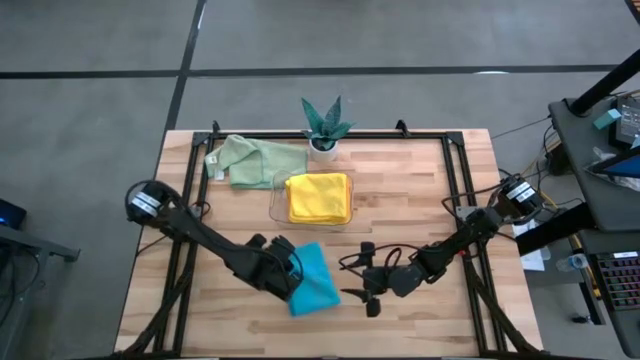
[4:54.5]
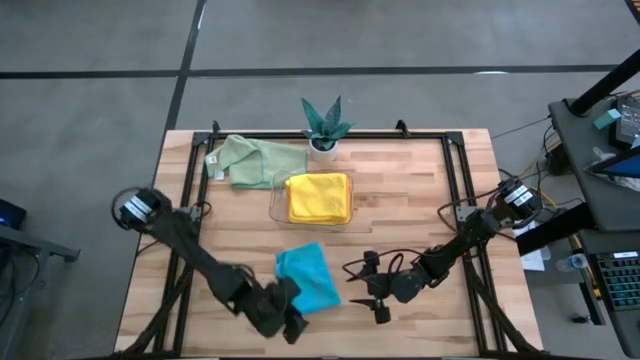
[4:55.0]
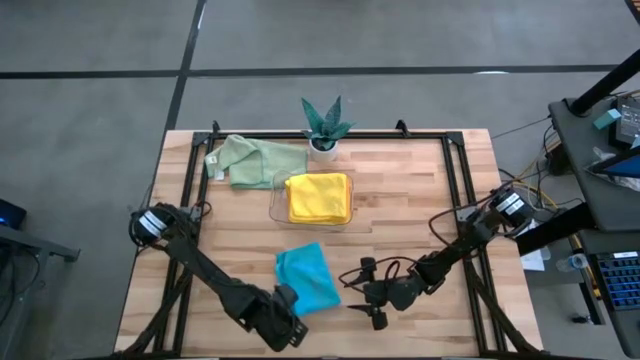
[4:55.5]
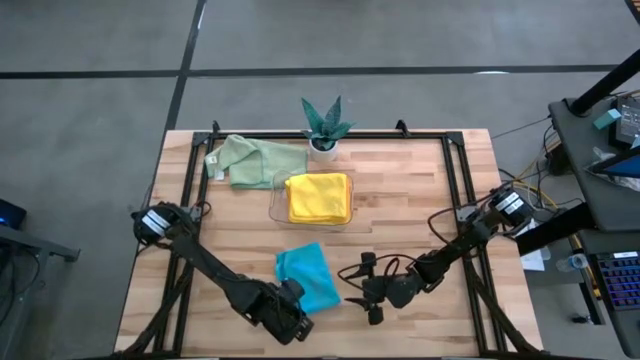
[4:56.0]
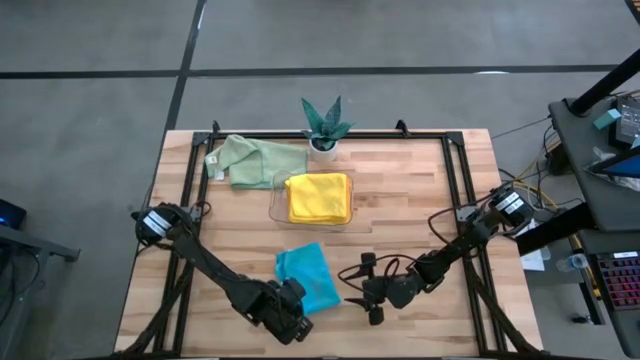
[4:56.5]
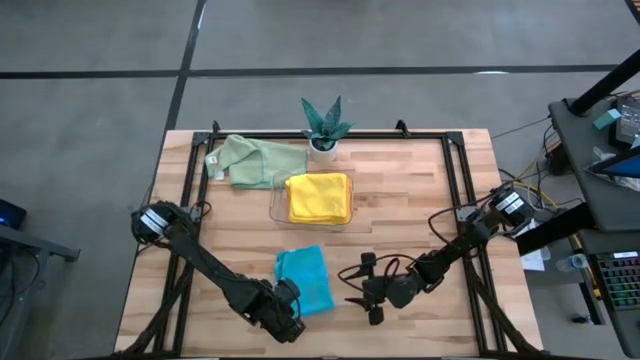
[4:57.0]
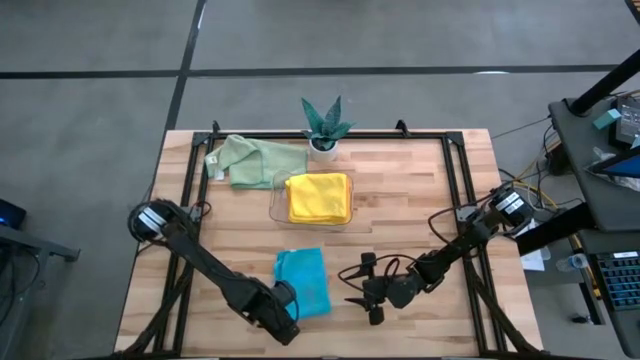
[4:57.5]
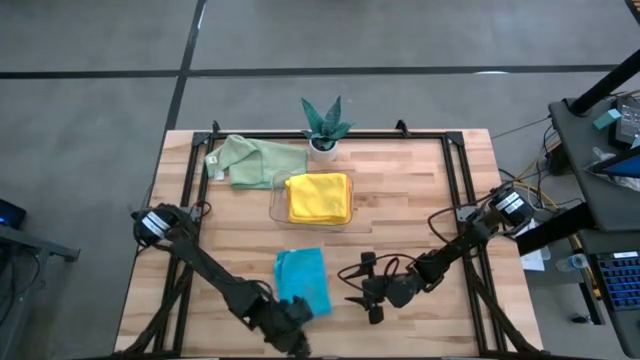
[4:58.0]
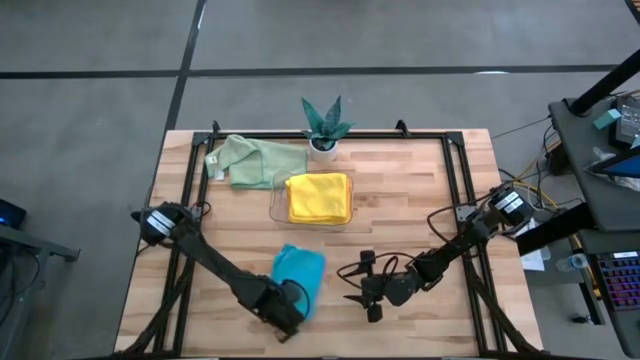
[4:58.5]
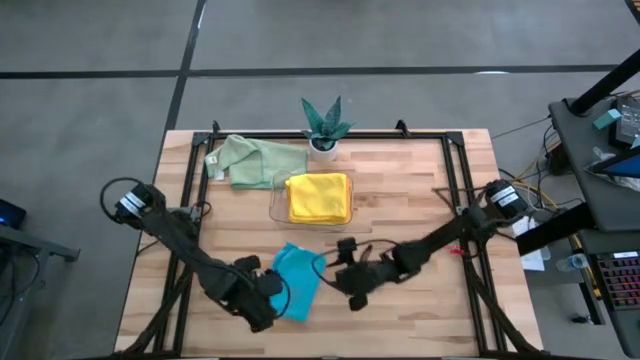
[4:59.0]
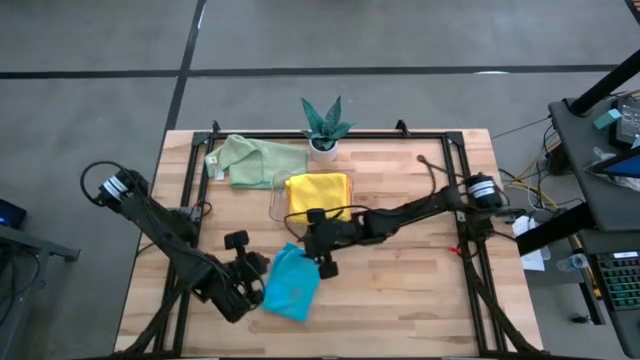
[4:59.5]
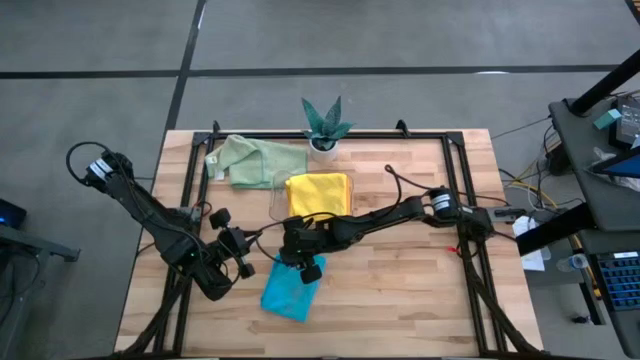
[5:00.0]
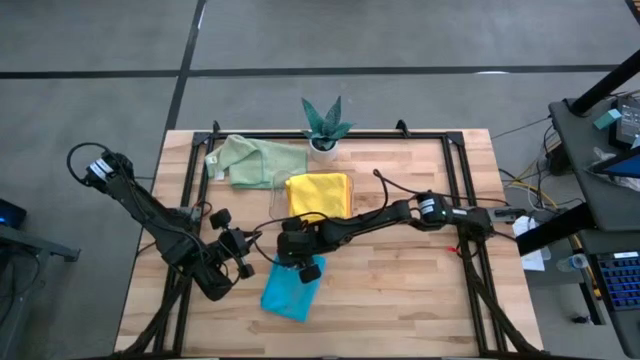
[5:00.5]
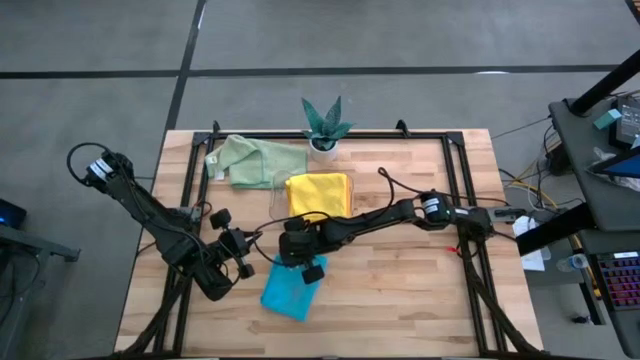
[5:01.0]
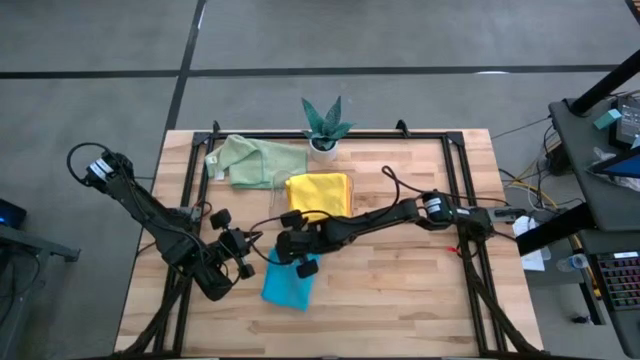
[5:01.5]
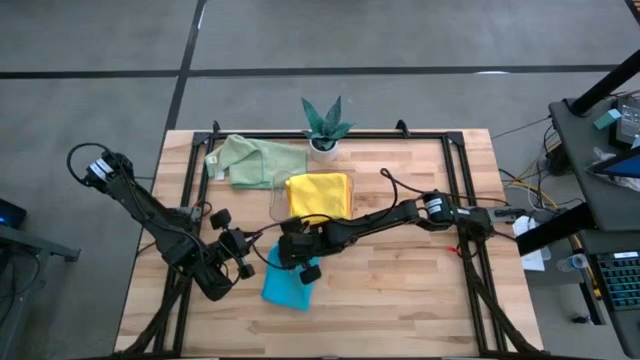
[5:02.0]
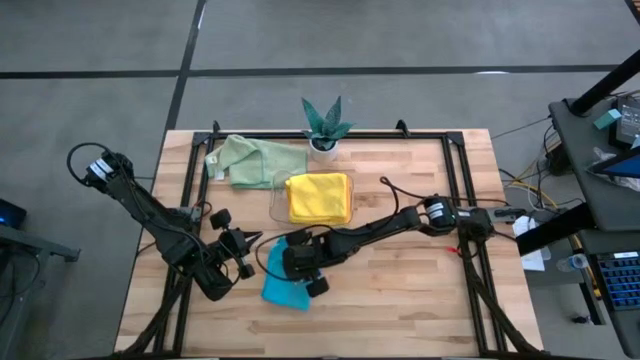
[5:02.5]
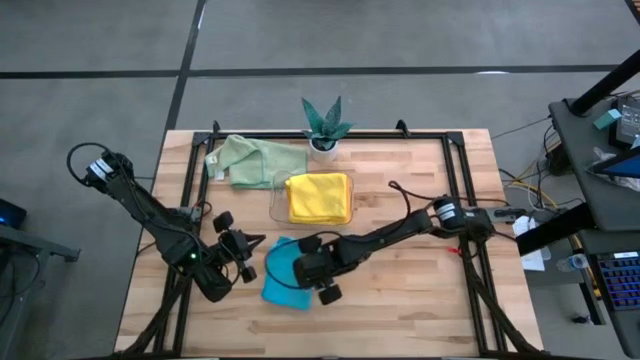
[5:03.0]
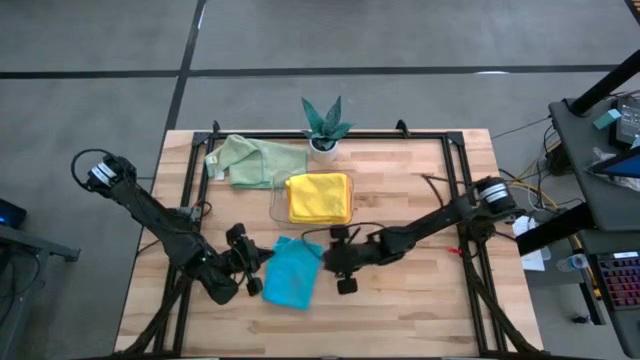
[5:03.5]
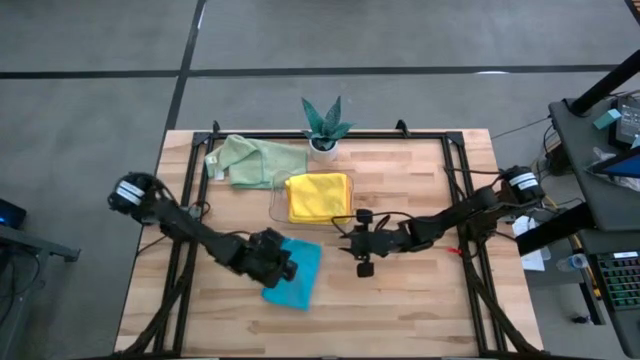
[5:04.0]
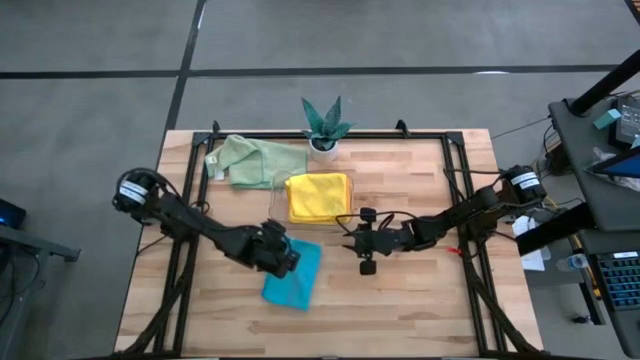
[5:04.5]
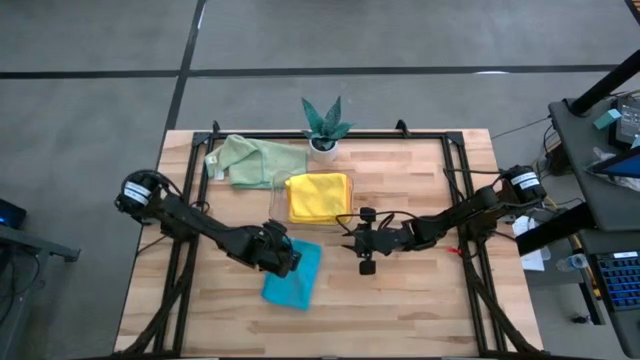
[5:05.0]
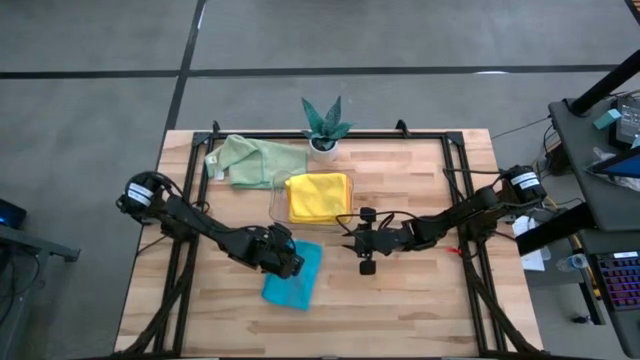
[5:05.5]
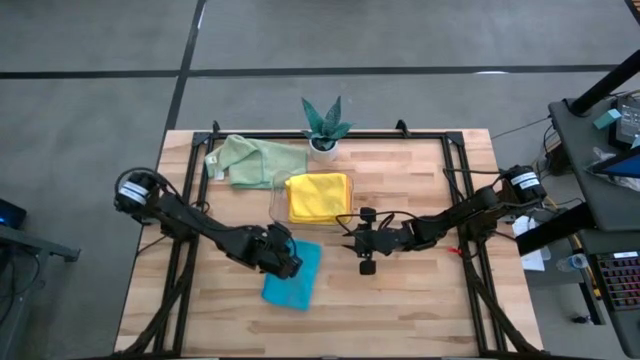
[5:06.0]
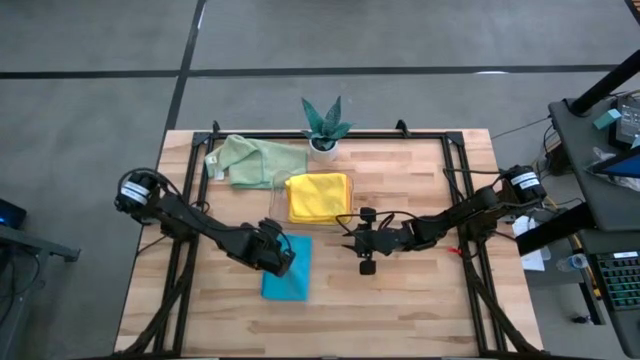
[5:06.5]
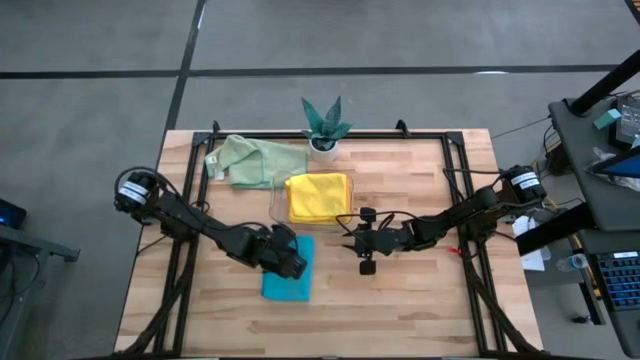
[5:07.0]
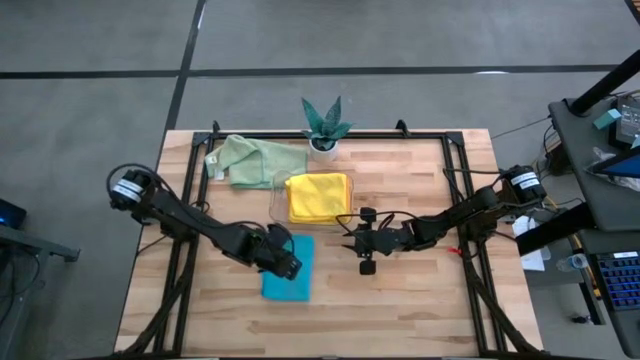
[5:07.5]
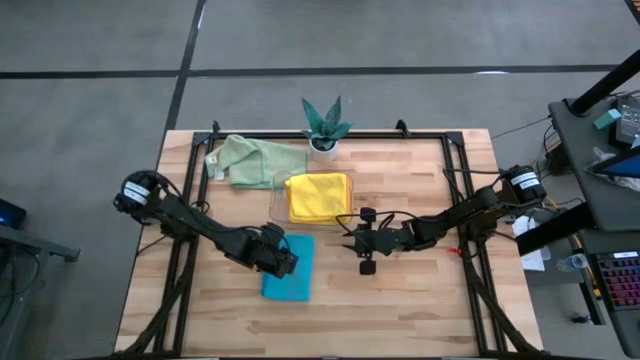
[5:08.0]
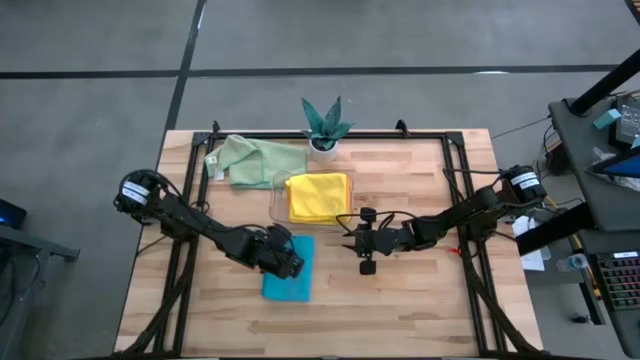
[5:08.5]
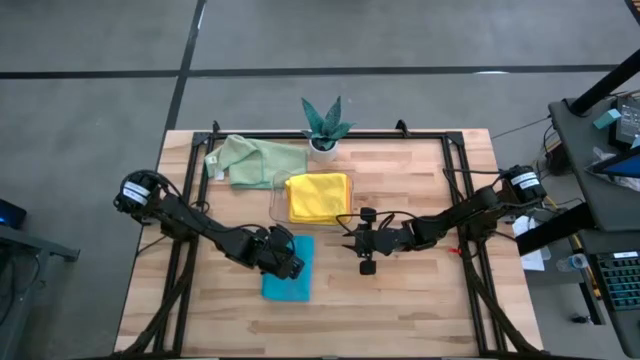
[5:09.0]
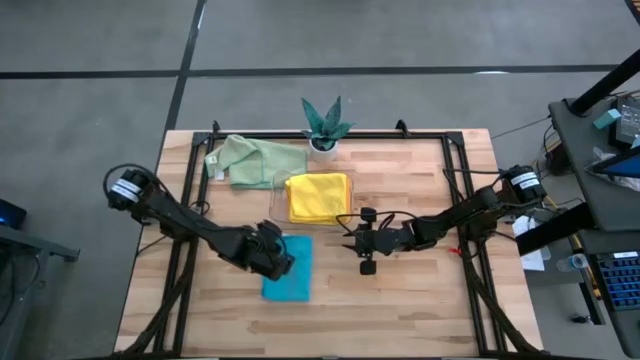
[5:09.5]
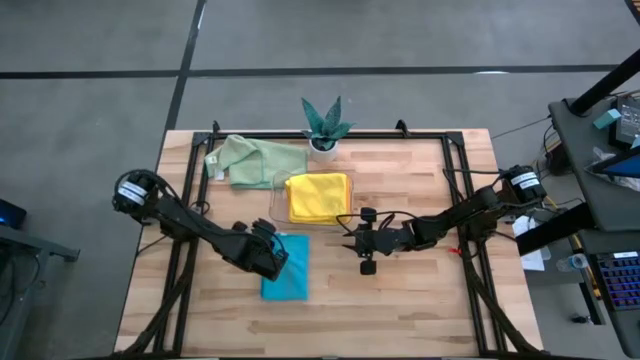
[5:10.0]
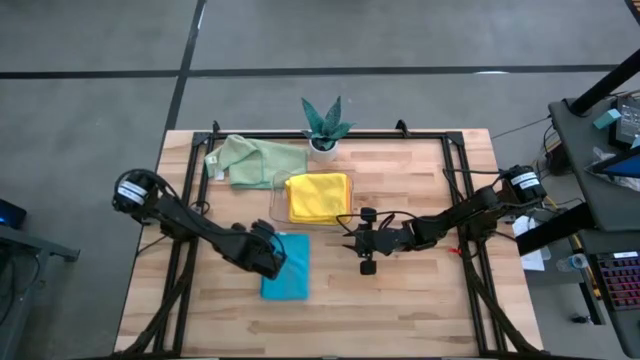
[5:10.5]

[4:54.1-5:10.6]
Task: Fold microfiber towels
Fold the blue microfiber towel
